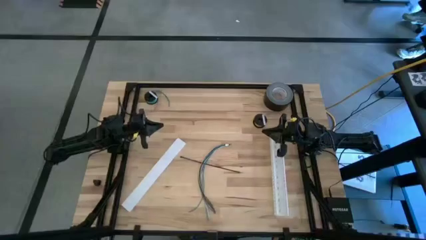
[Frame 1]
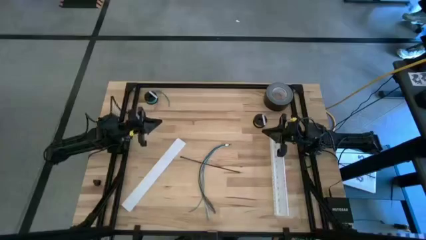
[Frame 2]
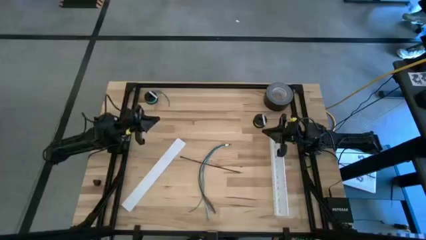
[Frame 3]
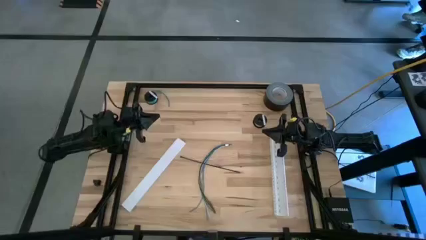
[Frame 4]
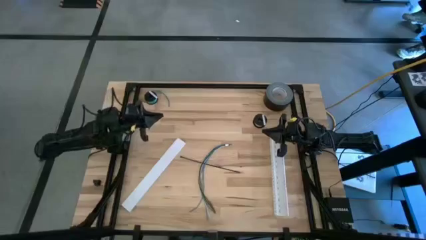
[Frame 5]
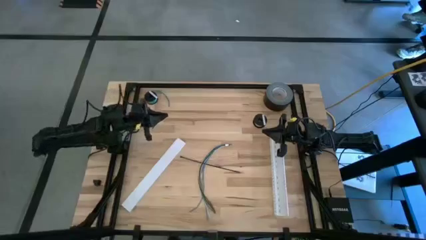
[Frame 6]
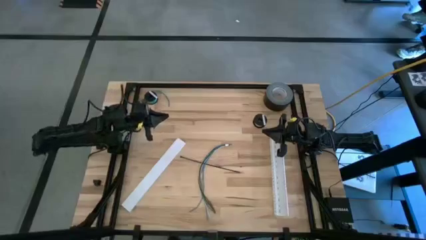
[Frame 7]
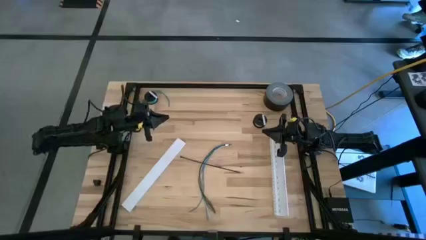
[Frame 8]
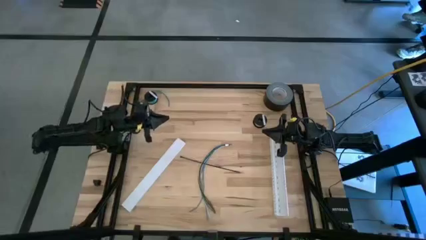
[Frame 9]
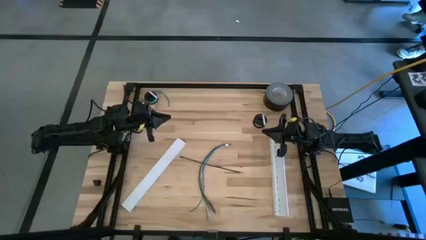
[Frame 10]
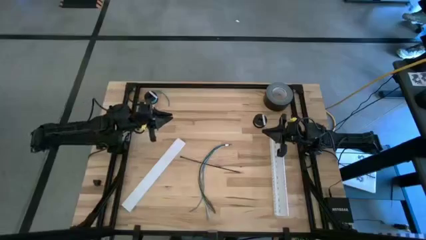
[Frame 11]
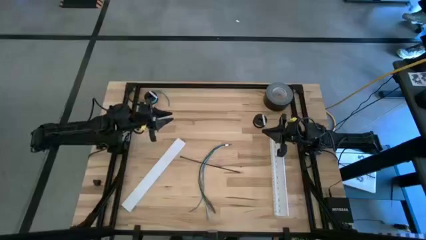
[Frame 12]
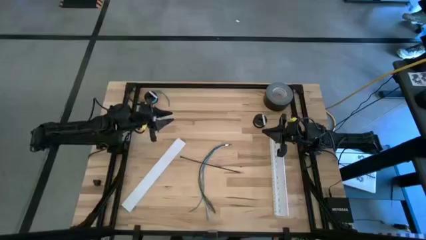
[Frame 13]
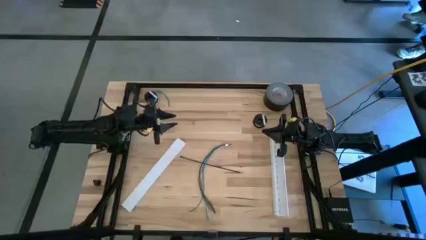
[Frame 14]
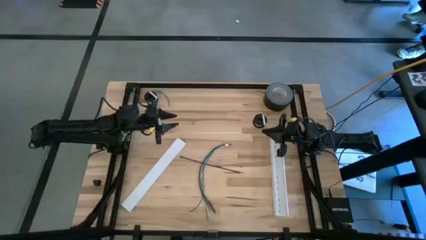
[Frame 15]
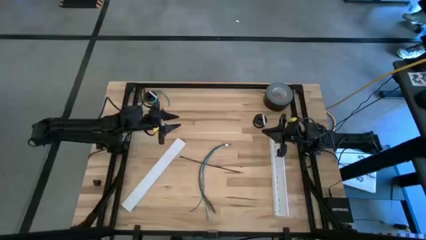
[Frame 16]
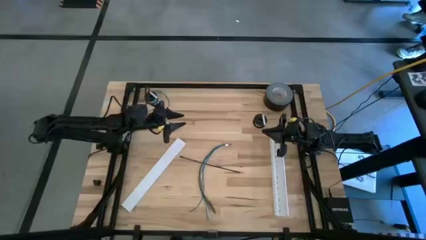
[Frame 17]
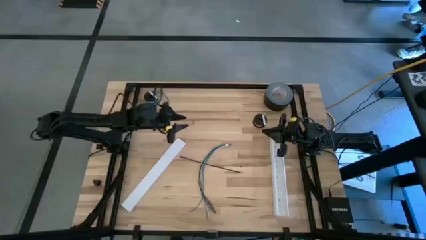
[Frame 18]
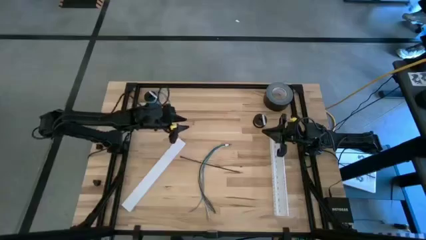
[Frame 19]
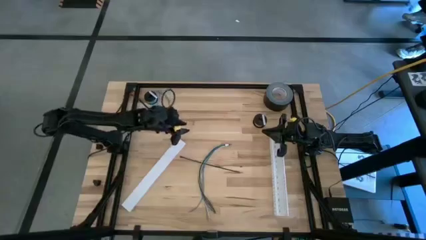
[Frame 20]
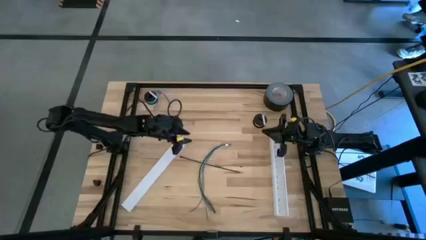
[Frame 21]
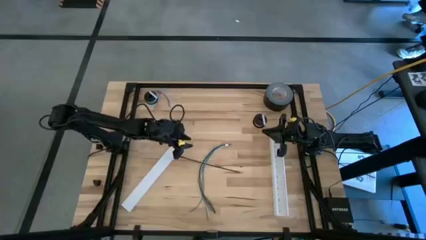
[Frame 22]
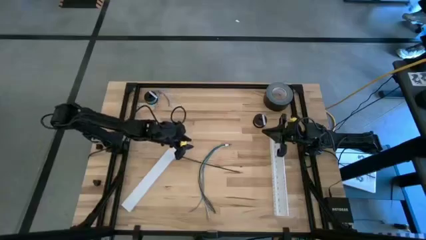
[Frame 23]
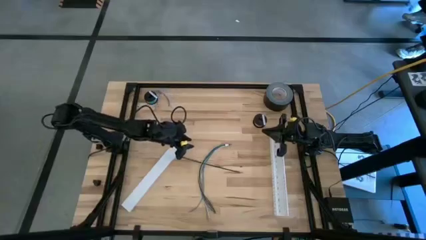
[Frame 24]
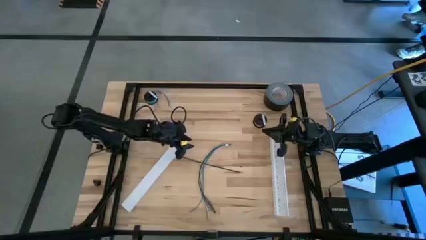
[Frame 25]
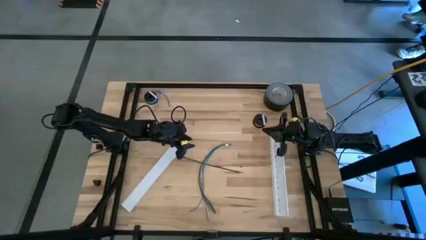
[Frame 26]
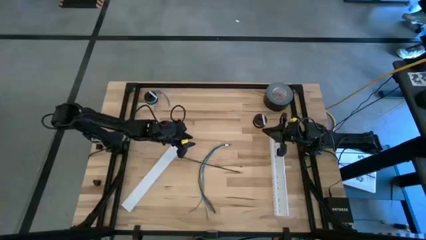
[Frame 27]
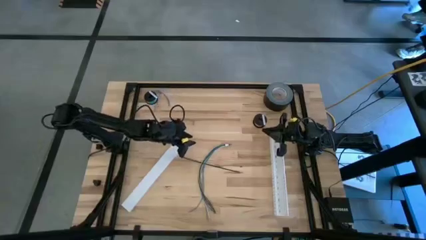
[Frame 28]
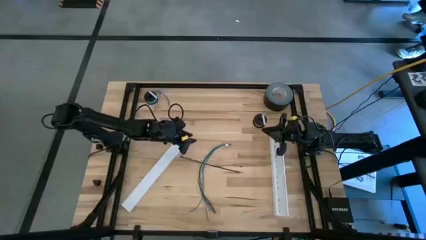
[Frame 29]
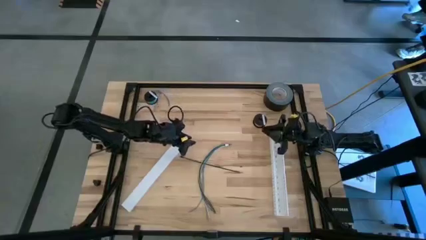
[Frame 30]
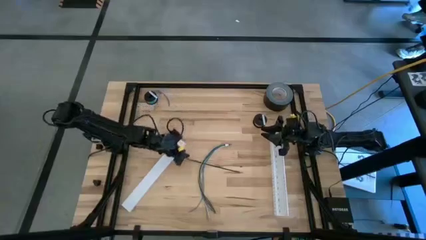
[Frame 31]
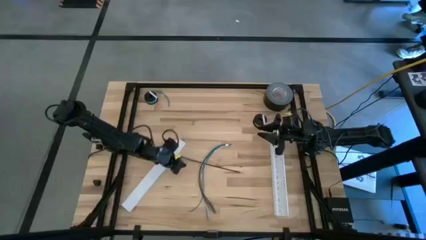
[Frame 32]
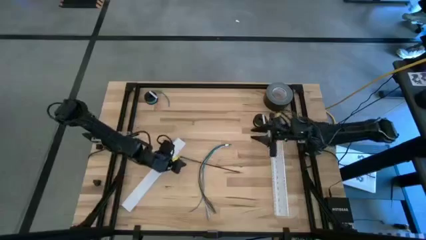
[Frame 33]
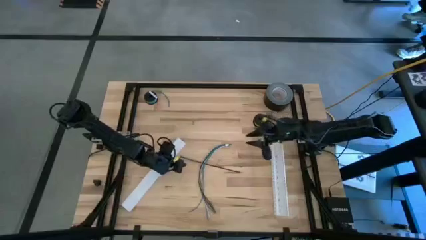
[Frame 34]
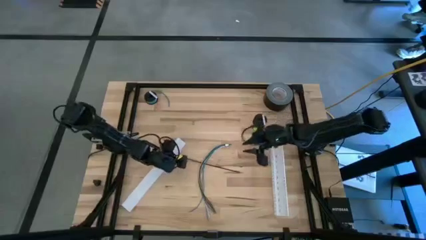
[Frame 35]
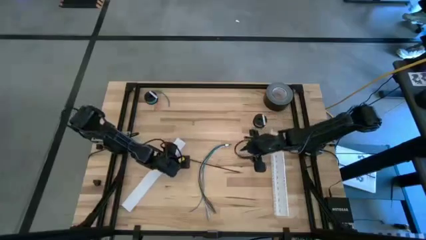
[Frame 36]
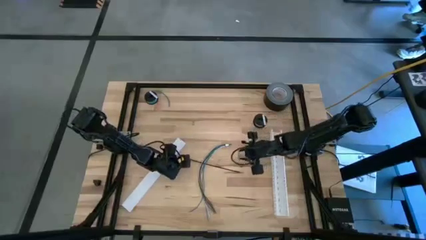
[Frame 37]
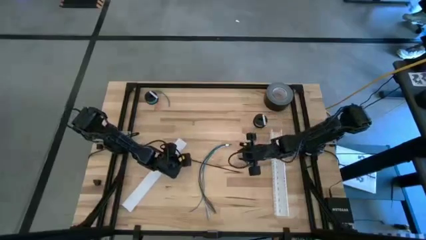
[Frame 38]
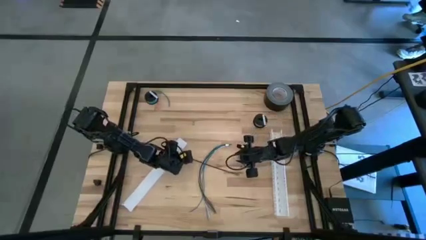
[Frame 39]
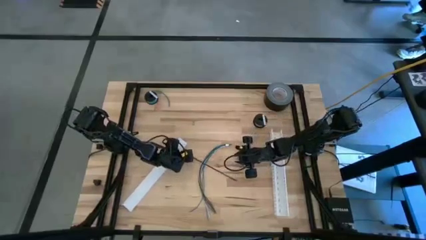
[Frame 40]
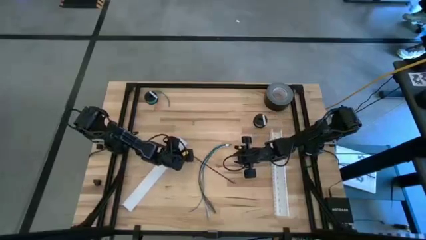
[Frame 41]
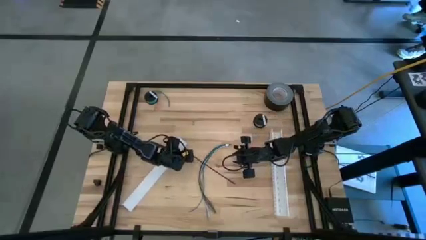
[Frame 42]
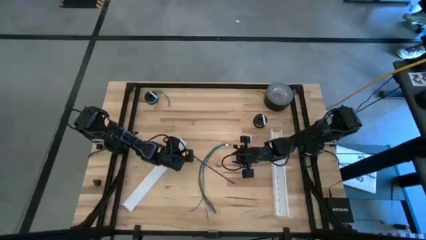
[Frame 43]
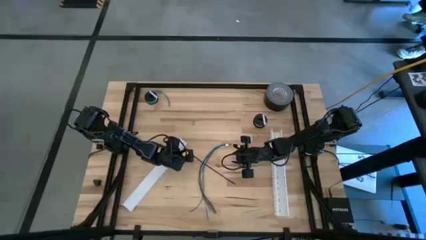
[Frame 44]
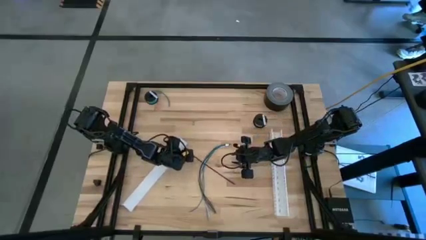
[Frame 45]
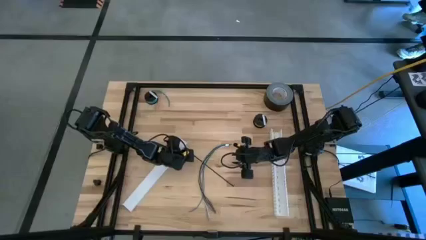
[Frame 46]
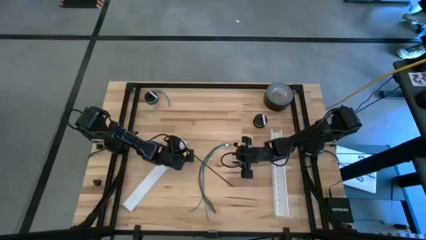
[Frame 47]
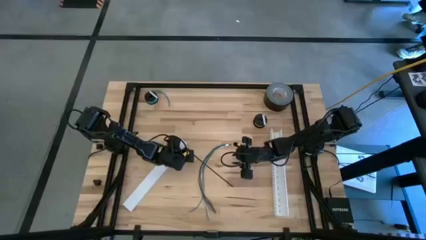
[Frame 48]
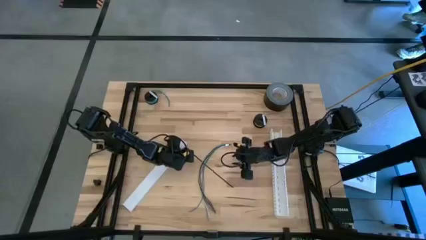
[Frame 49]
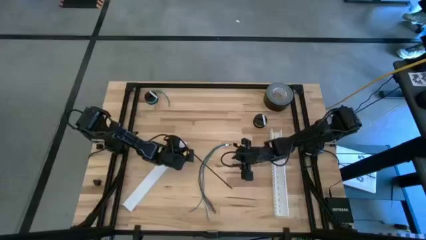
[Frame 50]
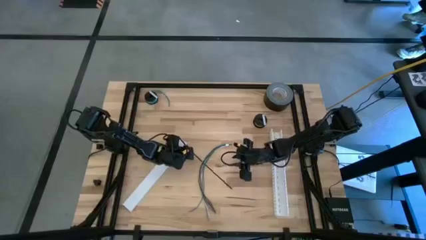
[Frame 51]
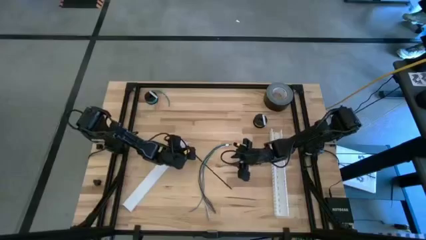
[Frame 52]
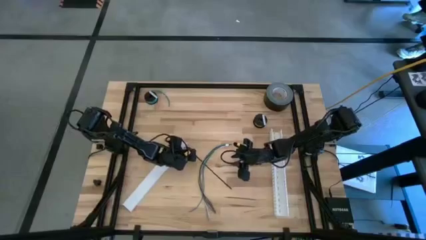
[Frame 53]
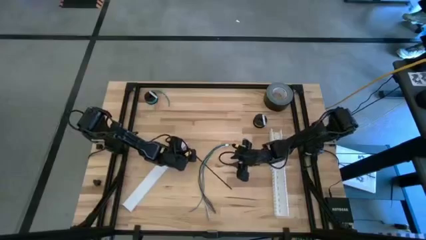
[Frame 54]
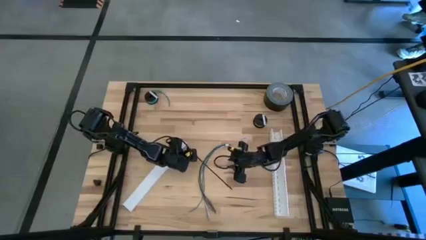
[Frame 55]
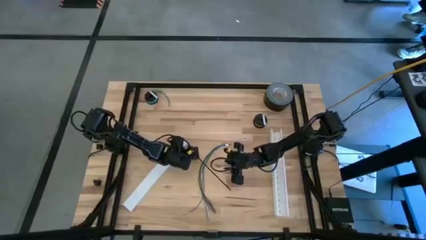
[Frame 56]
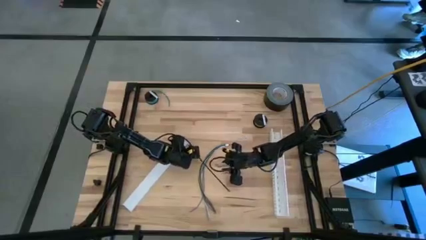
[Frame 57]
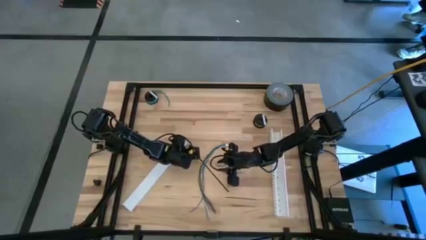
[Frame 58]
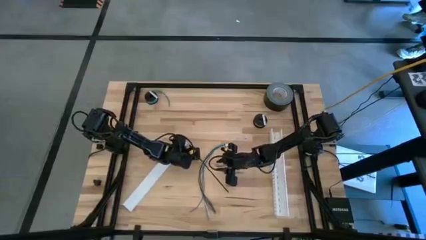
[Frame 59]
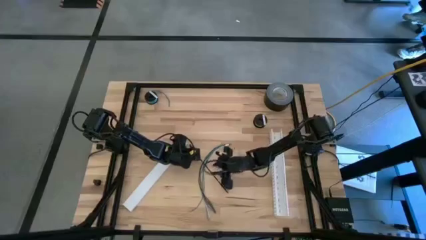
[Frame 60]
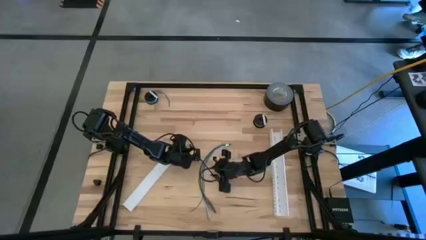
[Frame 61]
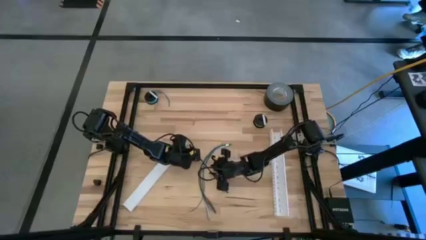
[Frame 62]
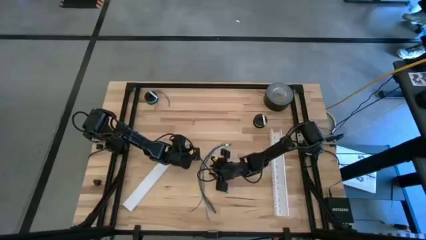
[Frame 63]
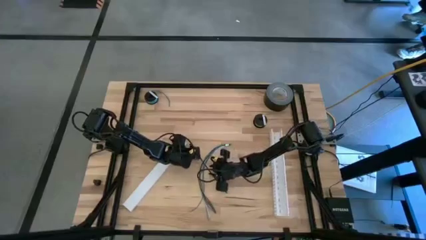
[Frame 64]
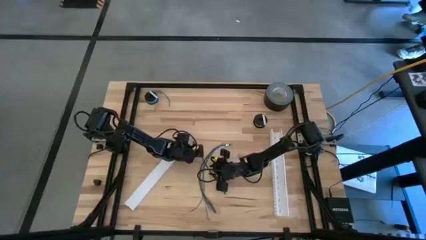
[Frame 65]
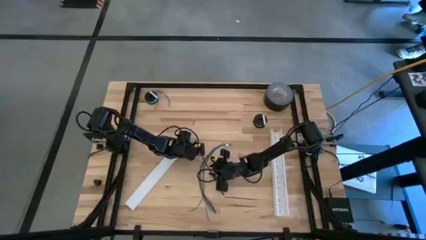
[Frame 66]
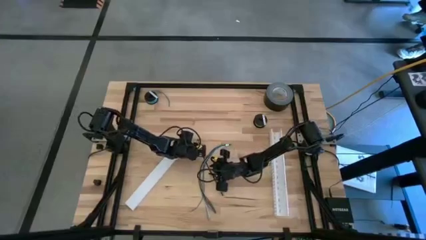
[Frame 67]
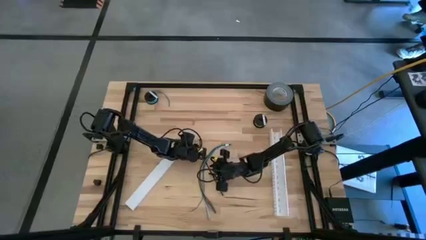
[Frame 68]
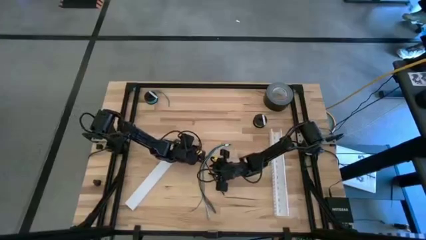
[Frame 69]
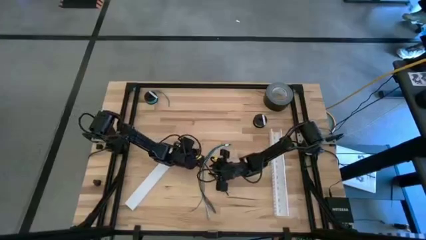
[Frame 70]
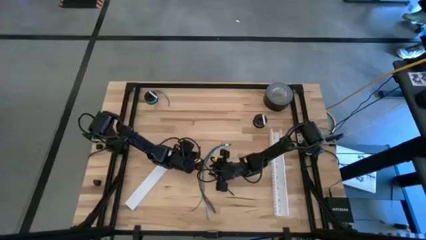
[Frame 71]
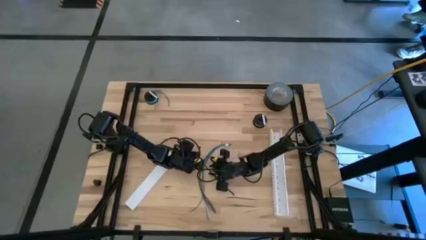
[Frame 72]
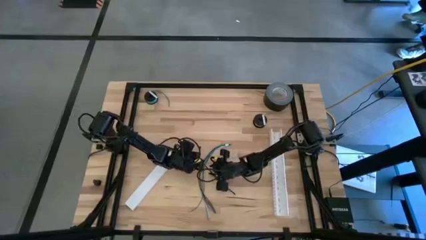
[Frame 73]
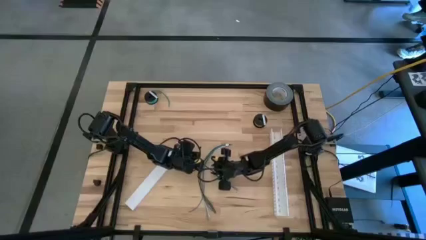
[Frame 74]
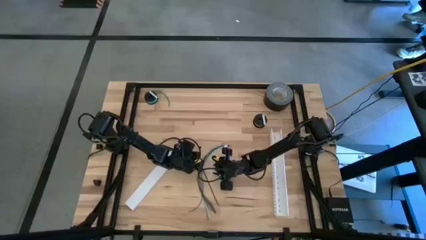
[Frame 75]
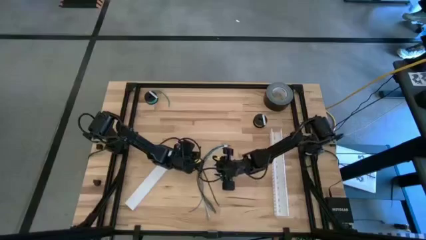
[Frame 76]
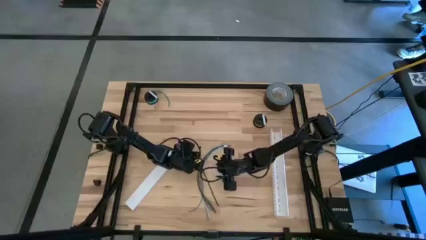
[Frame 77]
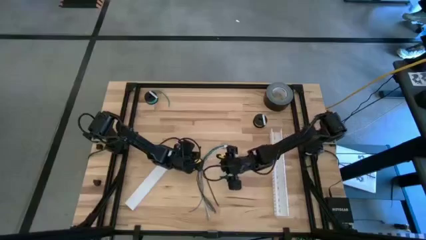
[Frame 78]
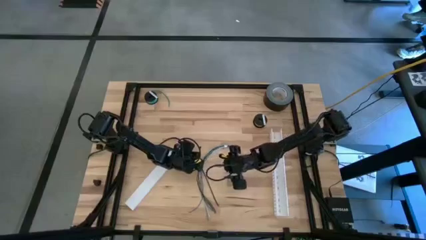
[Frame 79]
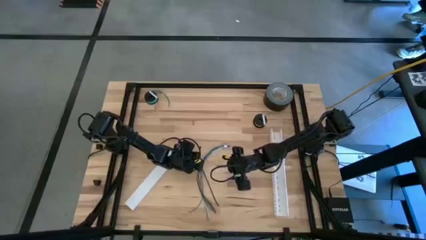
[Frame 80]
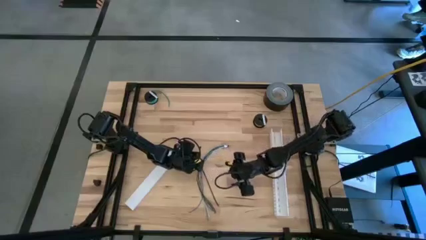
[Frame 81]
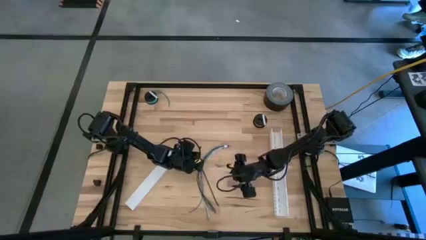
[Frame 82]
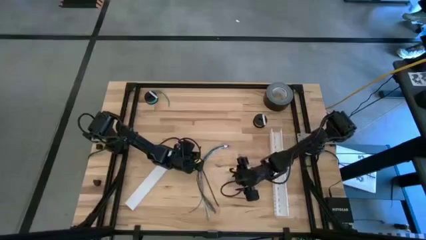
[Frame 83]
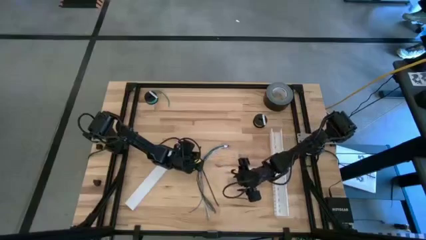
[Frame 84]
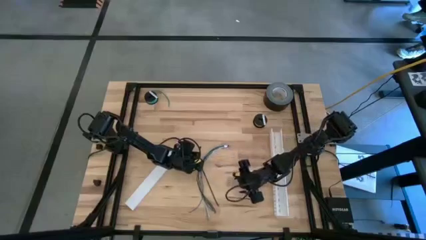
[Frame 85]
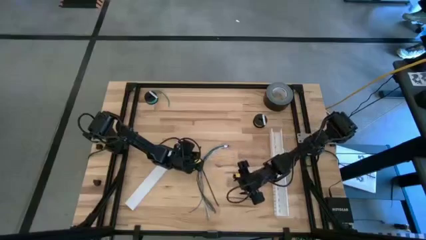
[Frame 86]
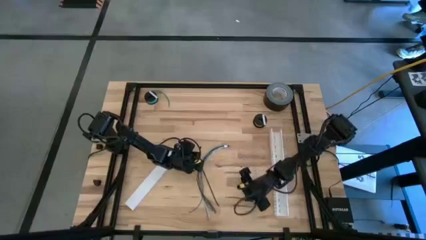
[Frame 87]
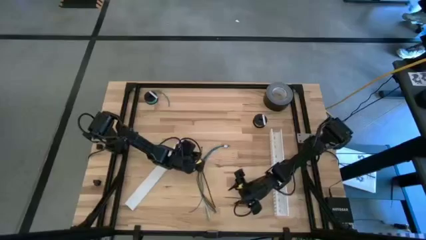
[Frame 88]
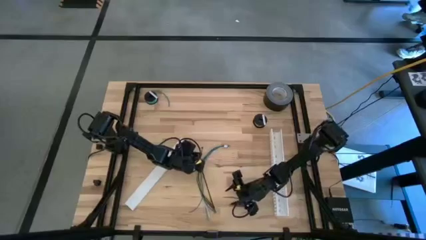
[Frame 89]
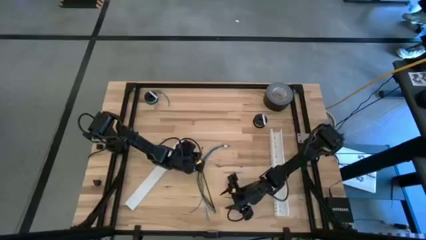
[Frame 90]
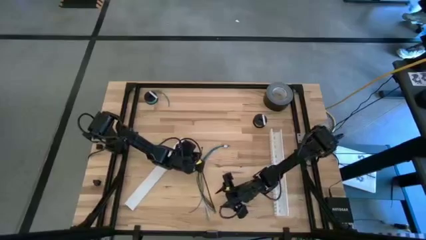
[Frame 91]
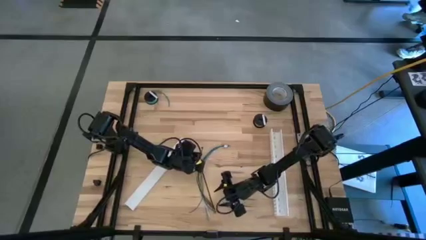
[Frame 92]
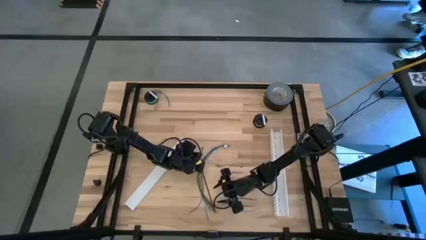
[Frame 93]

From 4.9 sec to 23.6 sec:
Task: Ziptie cables
Wrap the cable wires using the black zip tie
